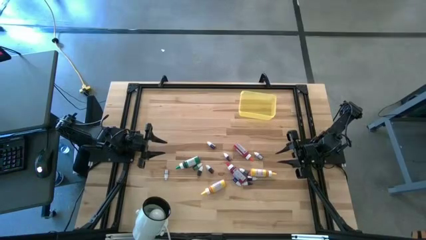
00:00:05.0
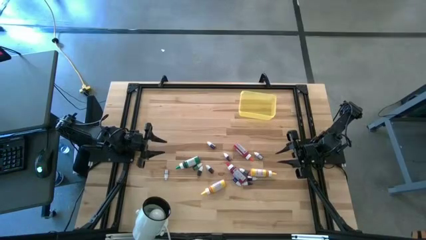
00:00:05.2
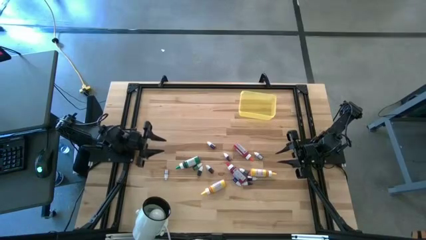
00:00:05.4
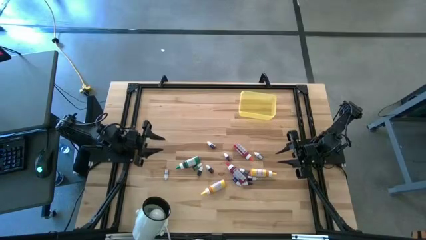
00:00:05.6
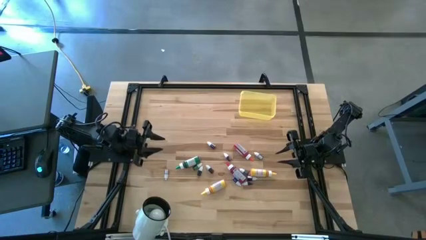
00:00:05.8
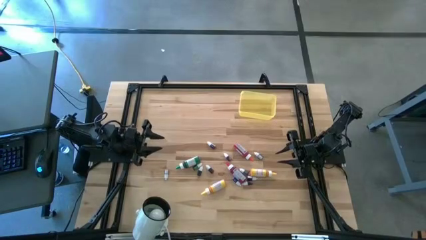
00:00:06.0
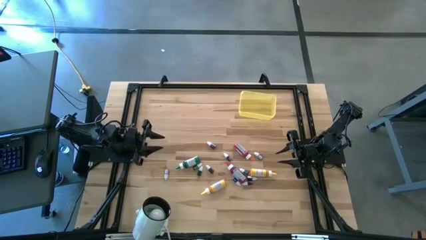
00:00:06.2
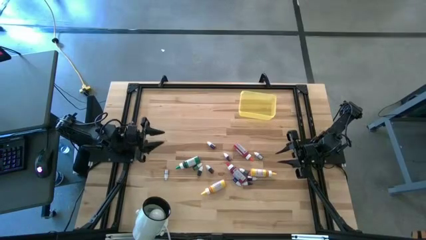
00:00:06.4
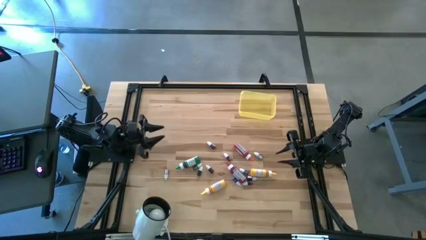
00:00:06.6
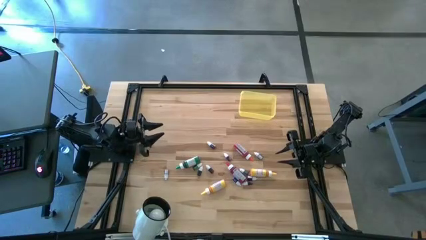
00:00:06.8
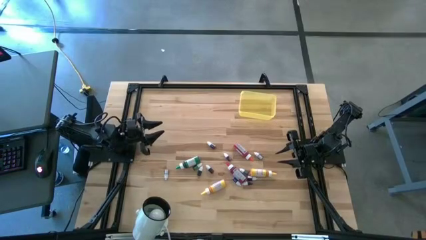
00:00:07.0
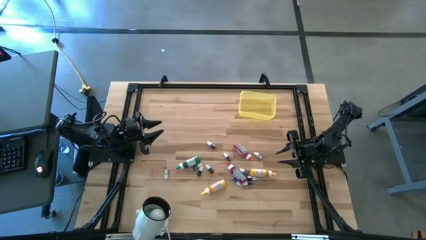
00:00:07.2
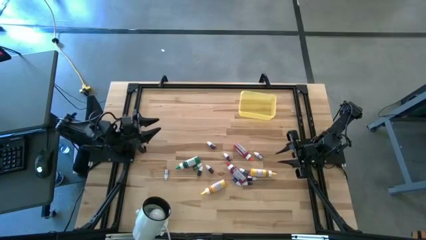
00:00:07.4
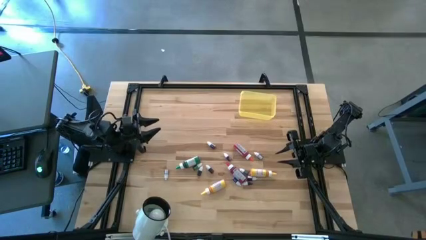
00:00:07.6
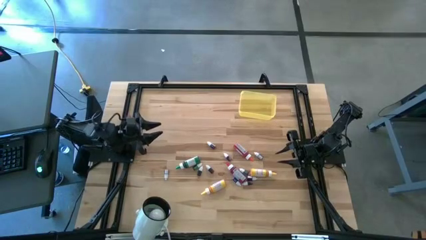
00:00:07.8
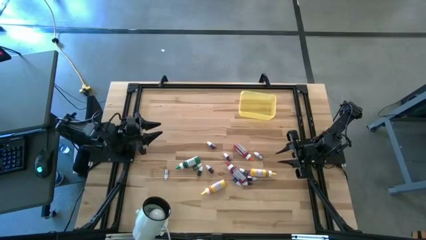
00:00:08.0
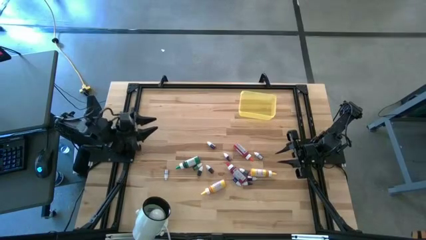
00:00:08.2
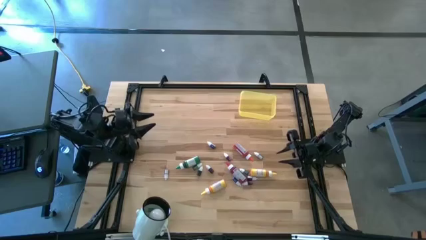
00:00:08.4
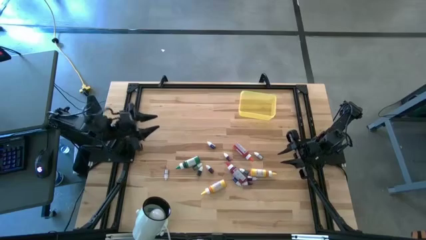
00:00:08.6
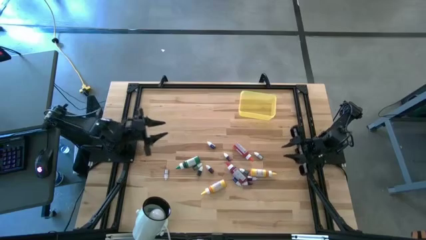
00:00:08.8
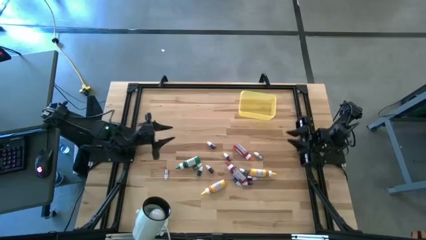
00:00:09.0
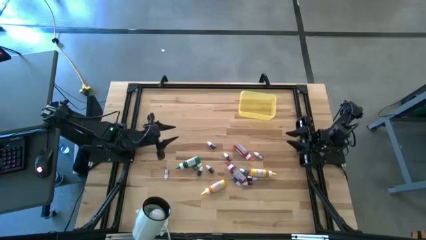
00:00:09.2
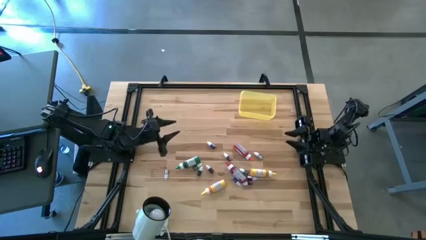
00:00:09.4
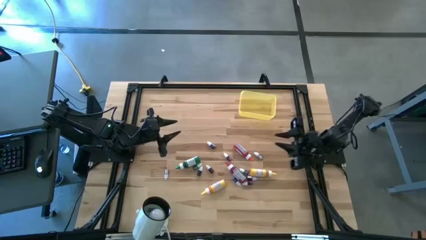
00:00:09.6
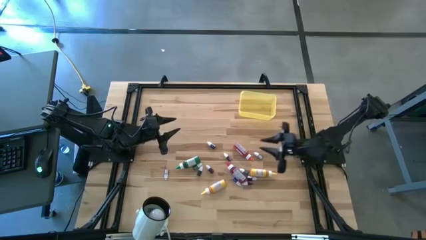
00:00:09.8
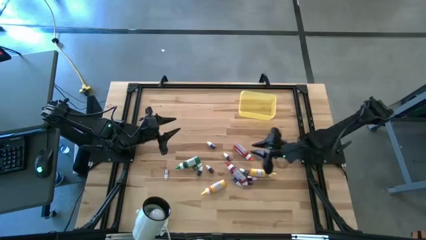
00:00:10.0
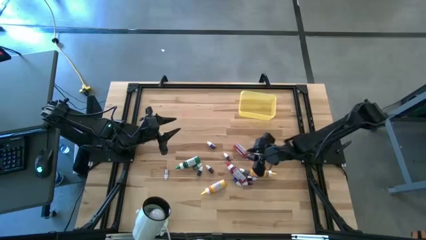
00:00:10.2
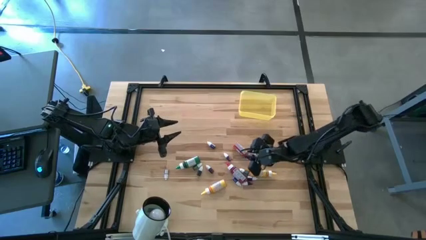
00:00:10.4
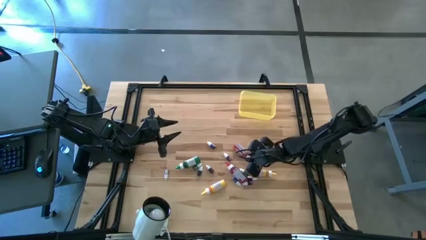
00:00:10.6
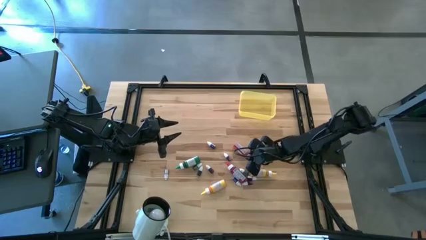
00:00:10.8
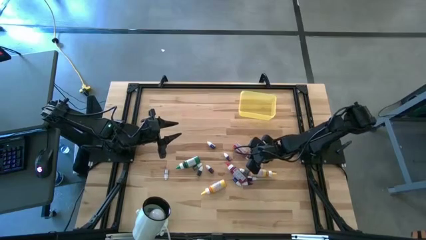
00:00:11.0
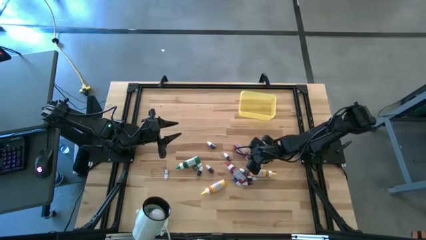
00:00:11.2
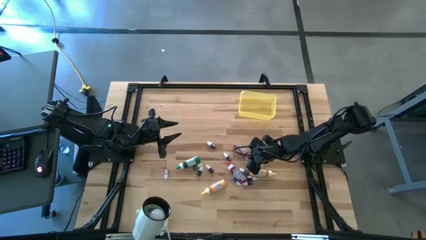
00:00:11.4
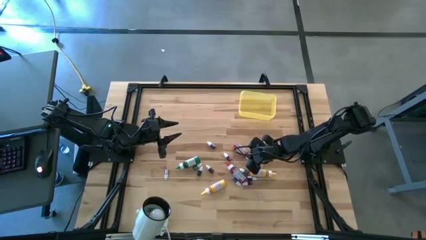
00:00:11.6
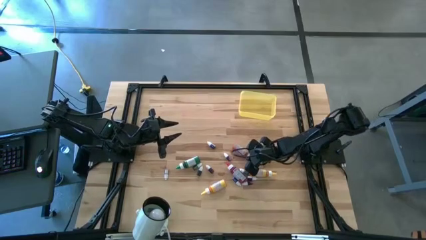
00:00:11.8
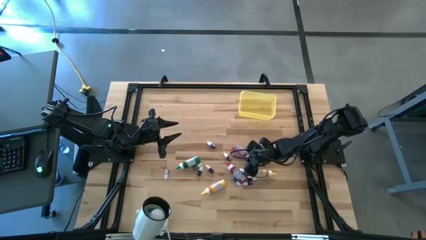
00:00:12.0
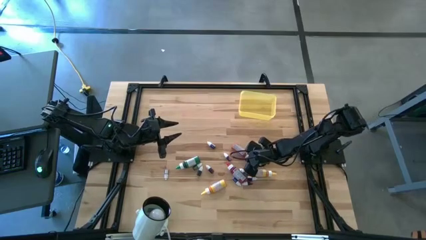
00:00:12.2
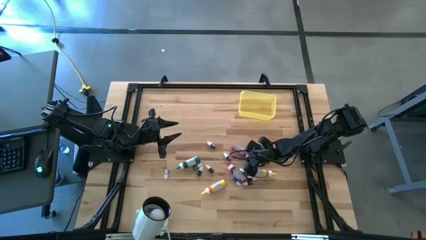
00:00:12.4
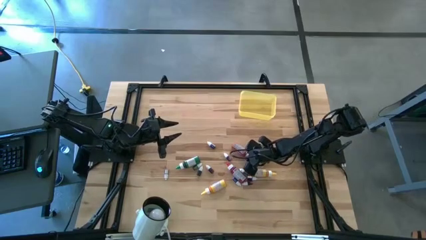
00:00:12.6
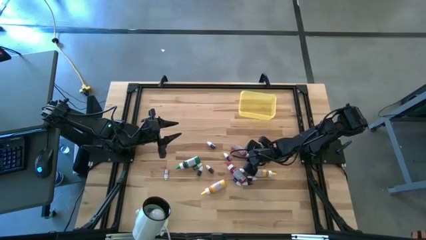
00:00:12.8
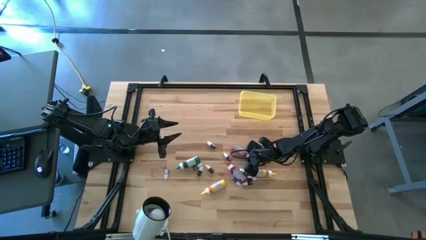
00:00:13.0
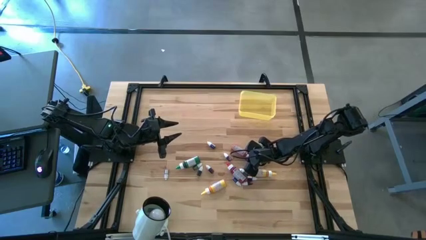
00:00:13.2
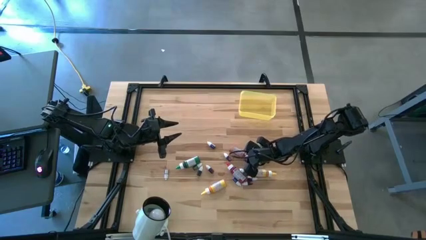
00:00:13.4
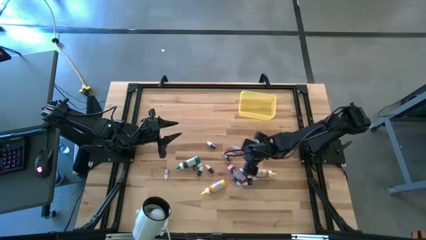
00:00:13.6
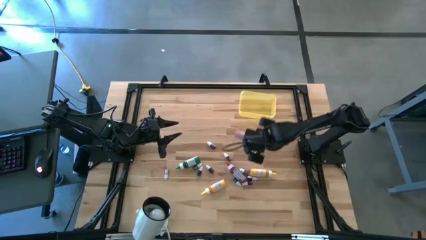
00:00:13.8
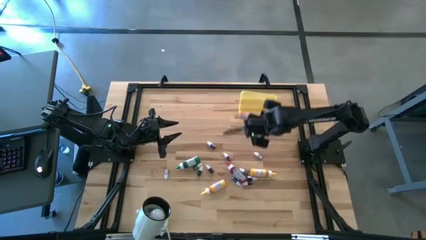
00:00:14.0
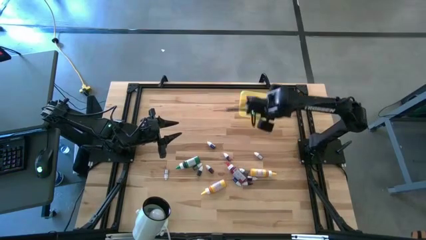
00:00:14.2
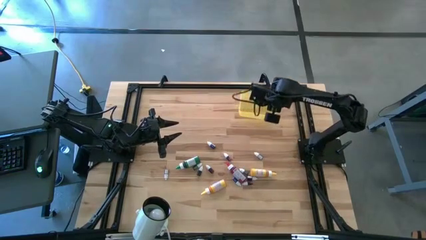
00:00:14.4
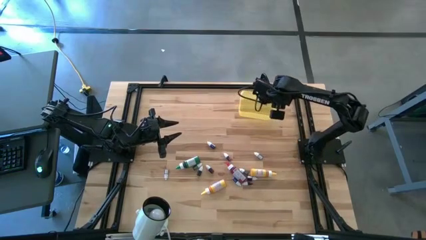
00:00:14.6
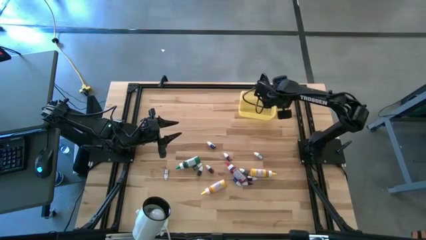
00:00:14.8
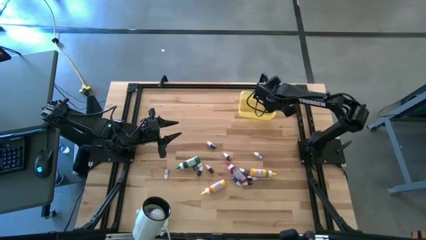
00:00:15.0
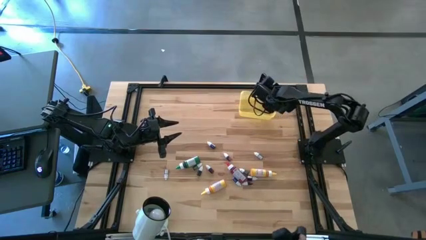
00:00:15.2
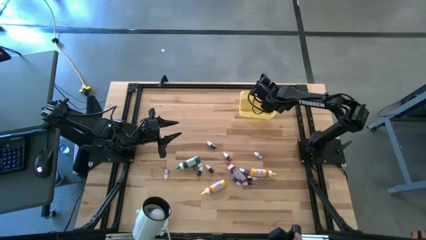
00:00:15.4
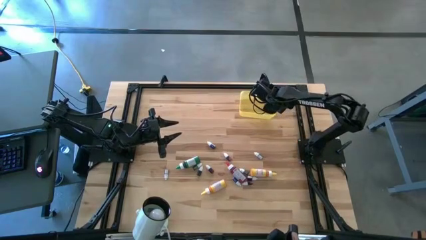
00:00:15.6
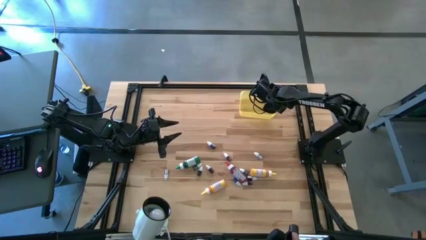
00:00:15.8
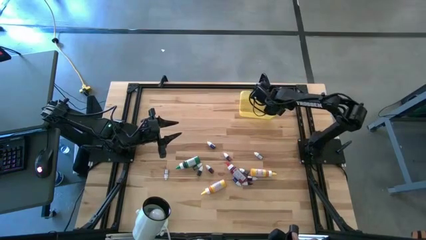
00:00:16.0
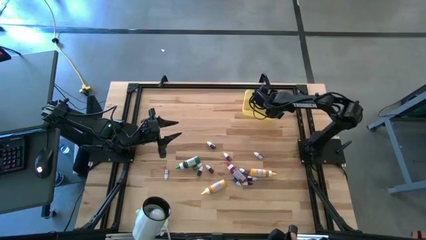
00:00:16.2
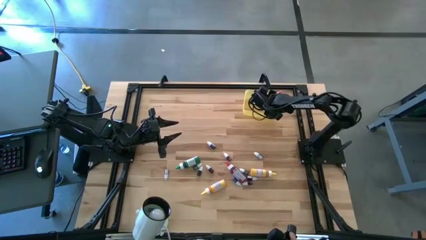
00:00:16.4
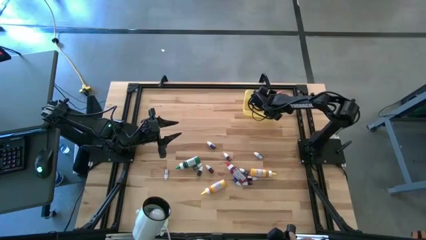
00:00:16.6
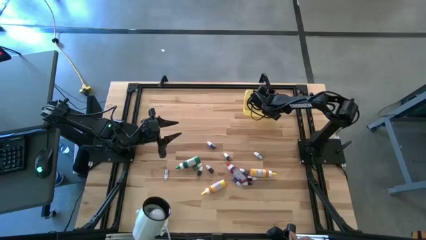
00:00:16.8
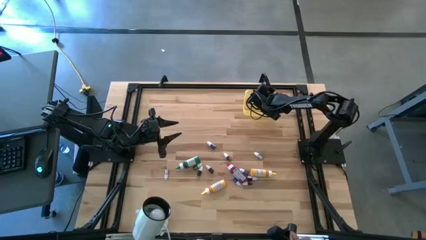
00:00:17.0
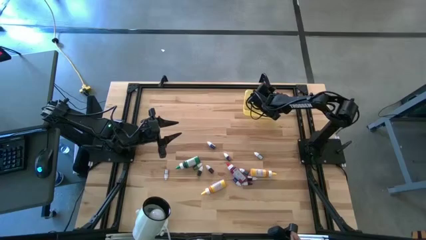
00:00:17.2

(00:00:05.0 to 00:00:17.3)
Task: Pick & Place food coloring
Put the big orange food coloring bottle into the yellow bin
